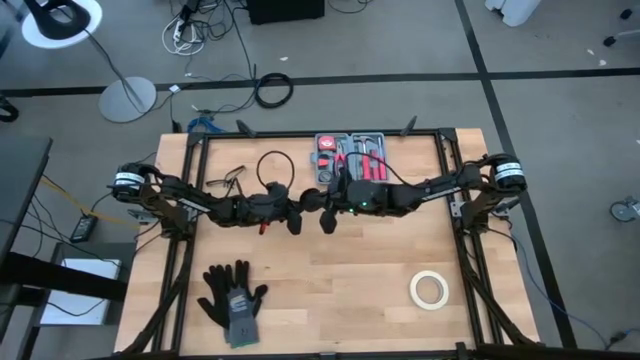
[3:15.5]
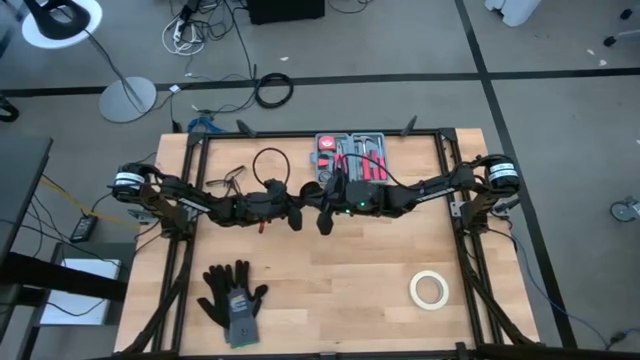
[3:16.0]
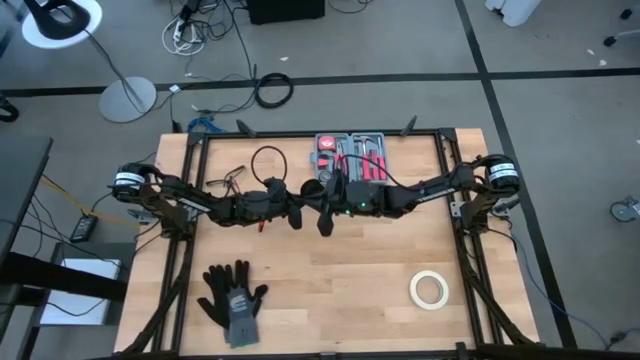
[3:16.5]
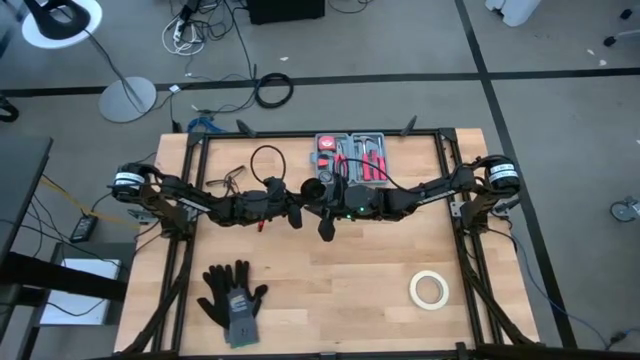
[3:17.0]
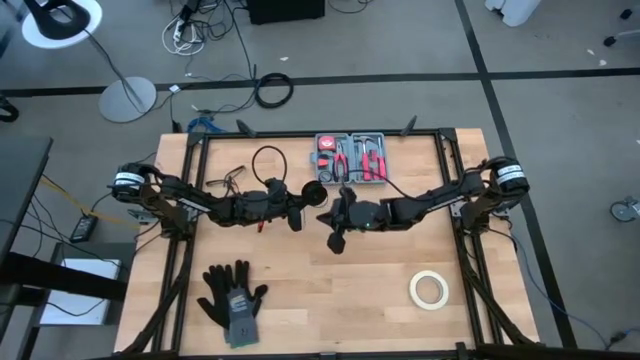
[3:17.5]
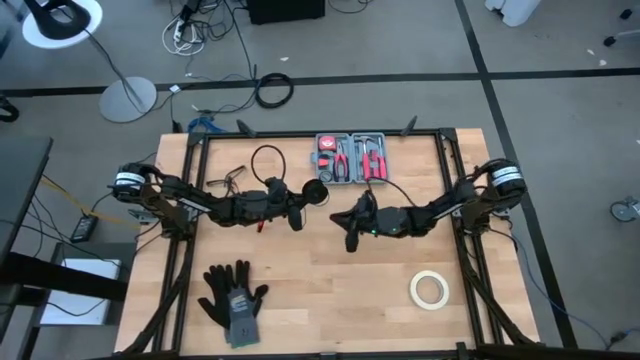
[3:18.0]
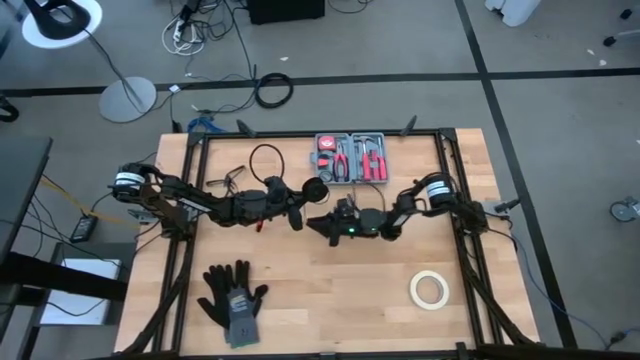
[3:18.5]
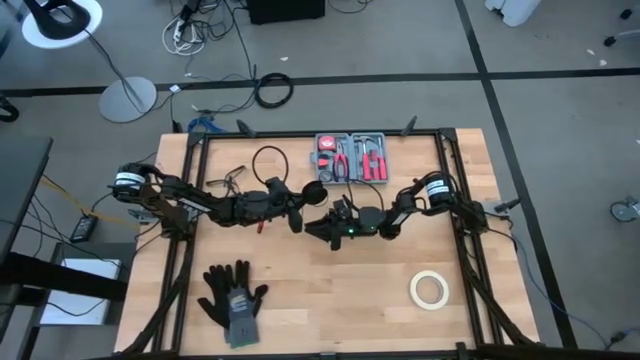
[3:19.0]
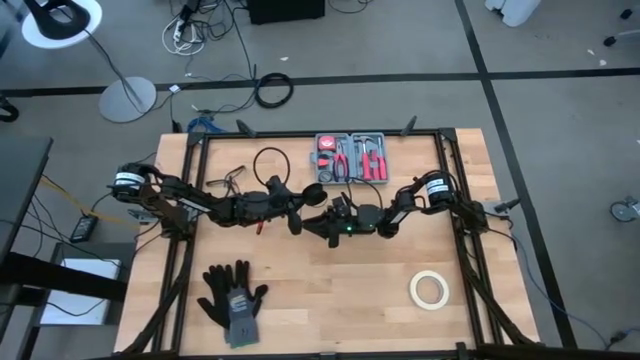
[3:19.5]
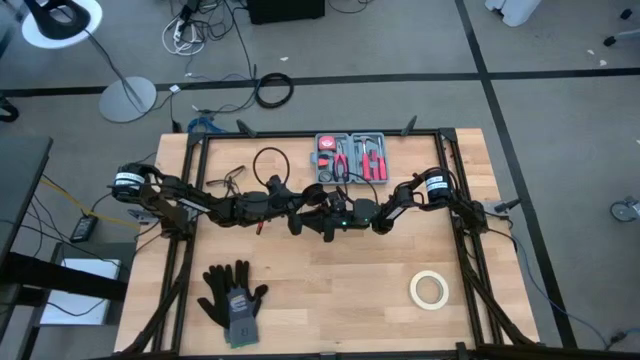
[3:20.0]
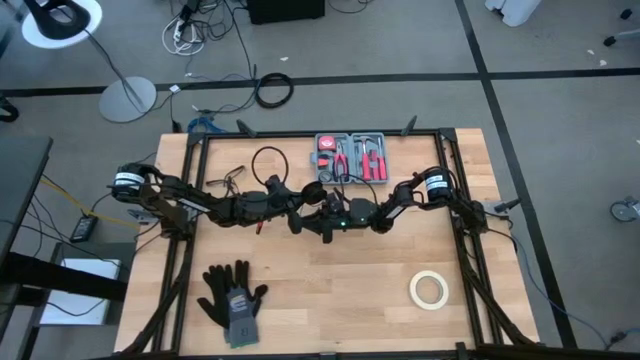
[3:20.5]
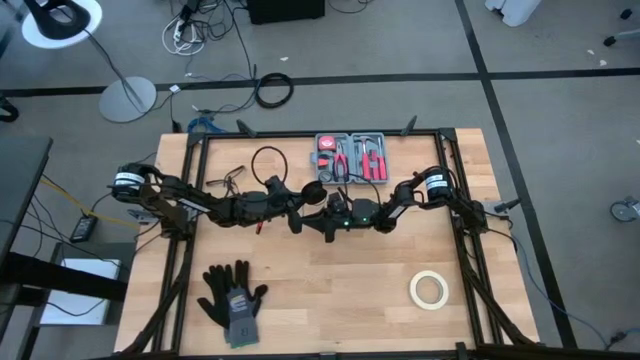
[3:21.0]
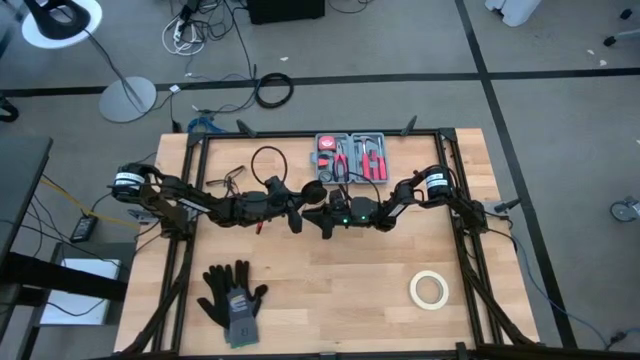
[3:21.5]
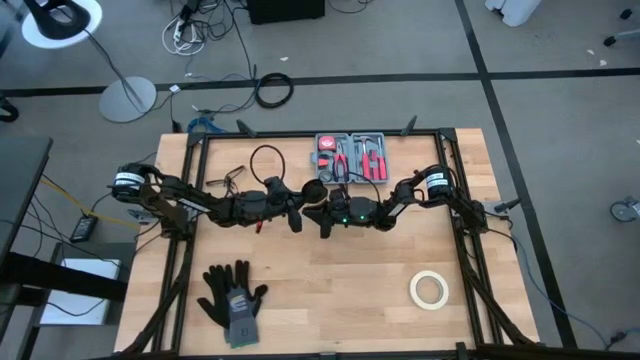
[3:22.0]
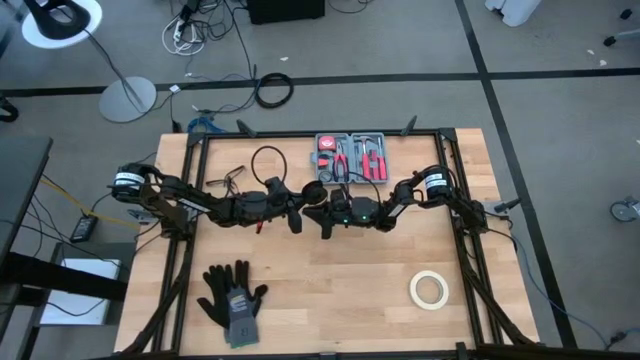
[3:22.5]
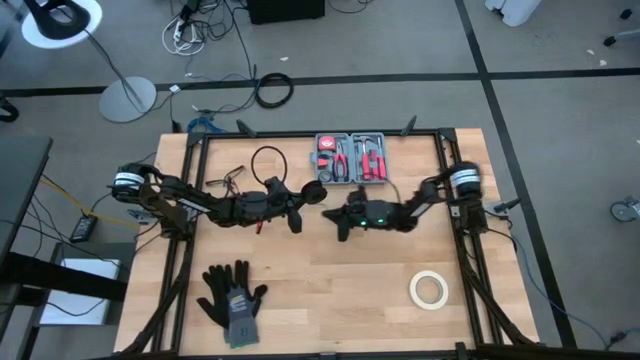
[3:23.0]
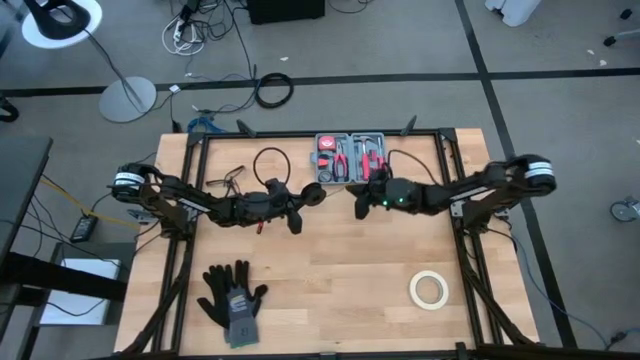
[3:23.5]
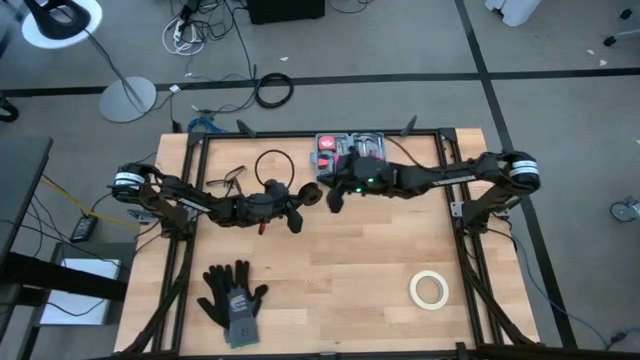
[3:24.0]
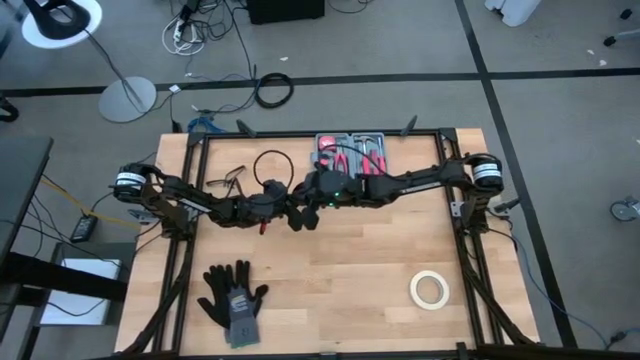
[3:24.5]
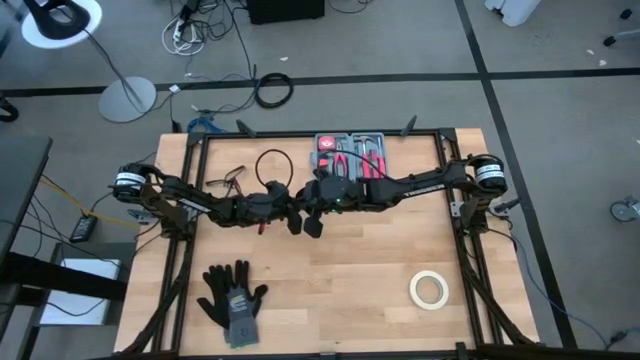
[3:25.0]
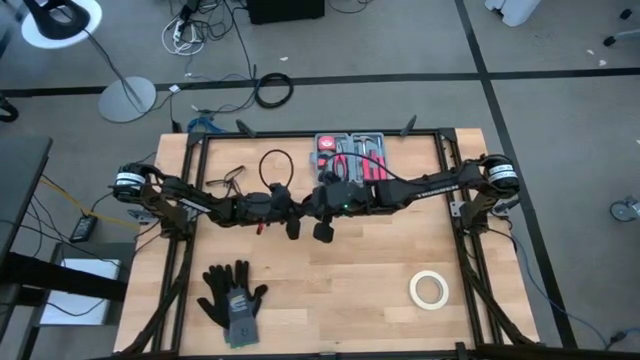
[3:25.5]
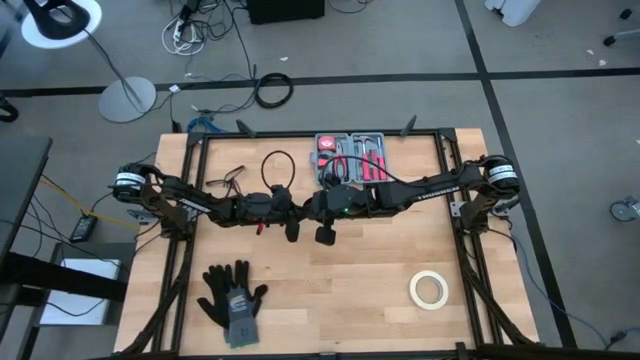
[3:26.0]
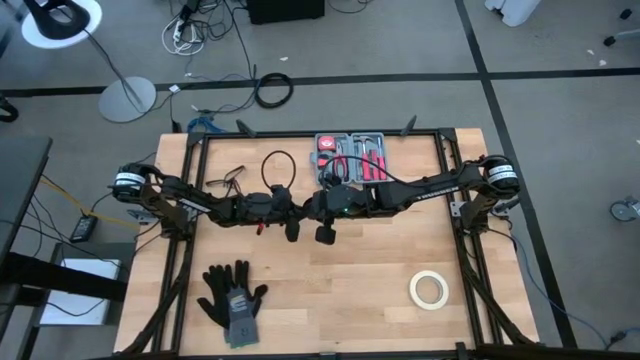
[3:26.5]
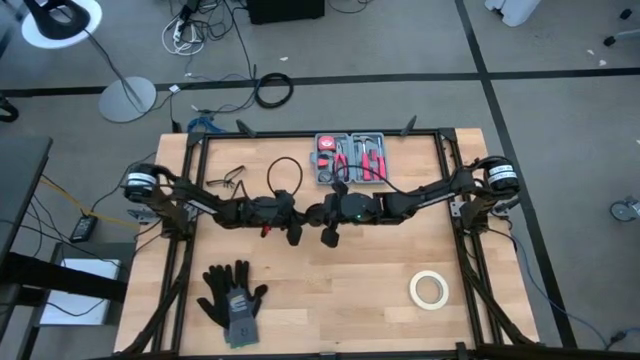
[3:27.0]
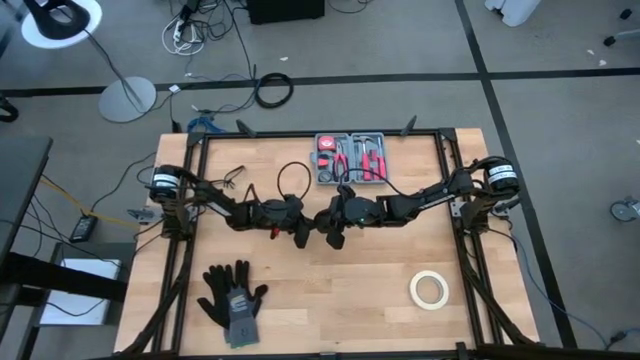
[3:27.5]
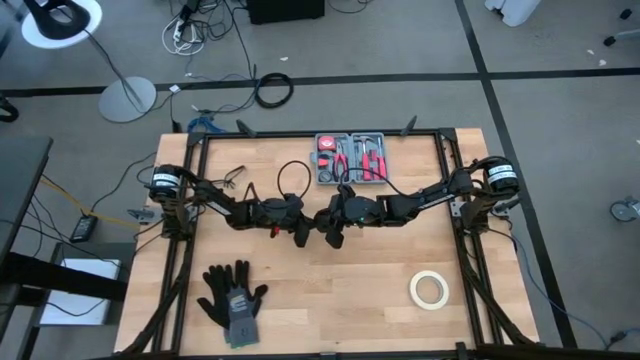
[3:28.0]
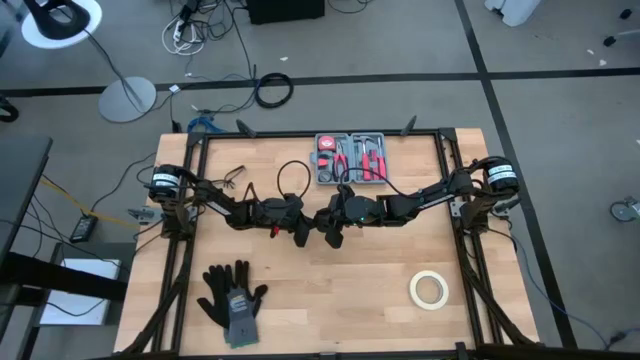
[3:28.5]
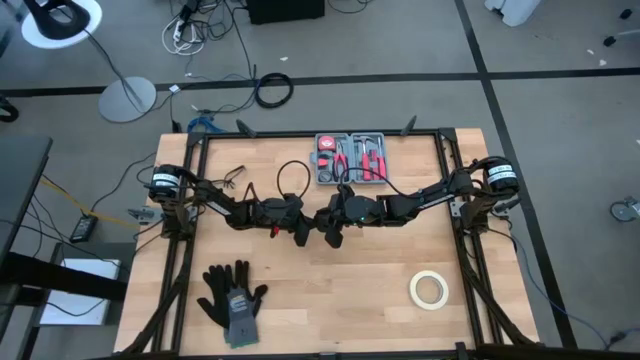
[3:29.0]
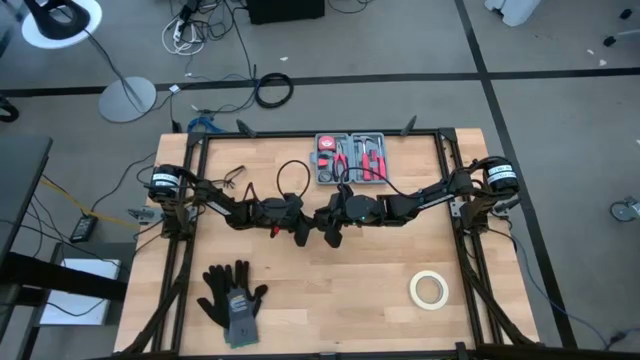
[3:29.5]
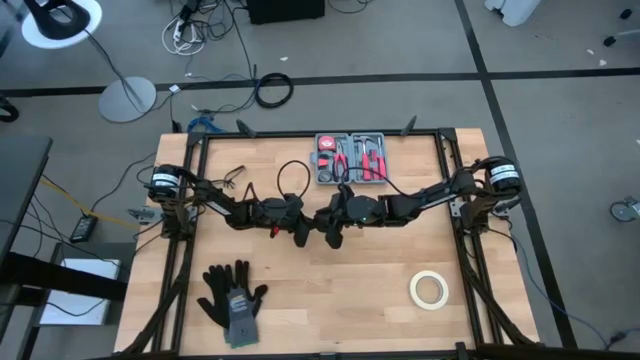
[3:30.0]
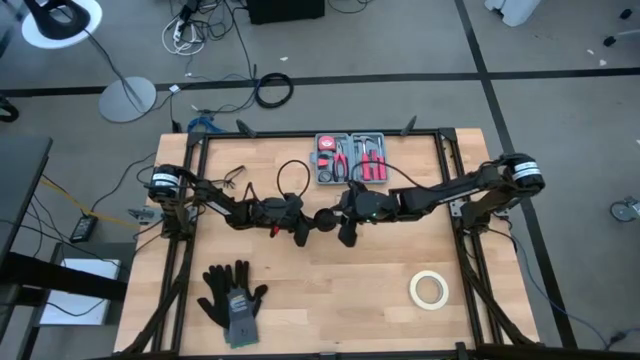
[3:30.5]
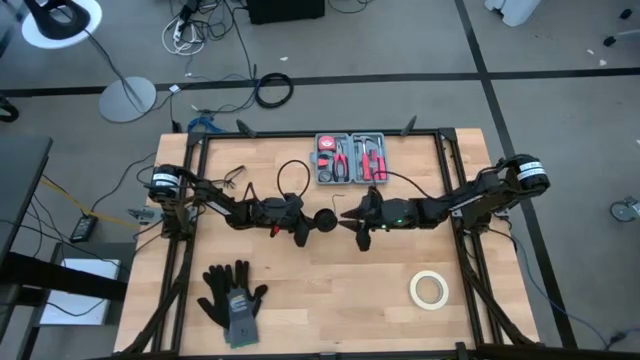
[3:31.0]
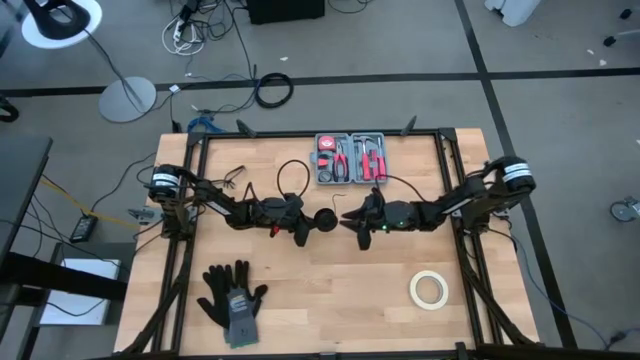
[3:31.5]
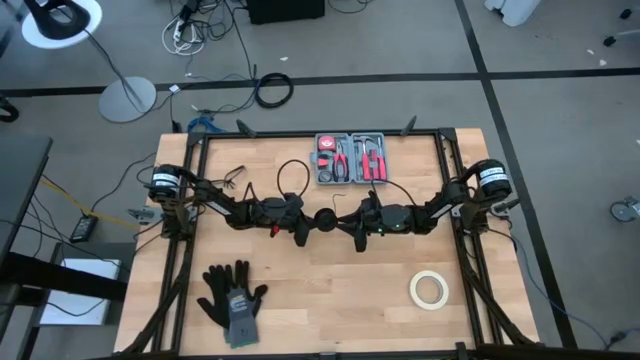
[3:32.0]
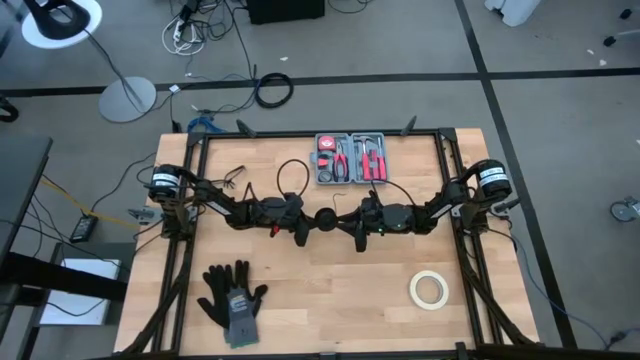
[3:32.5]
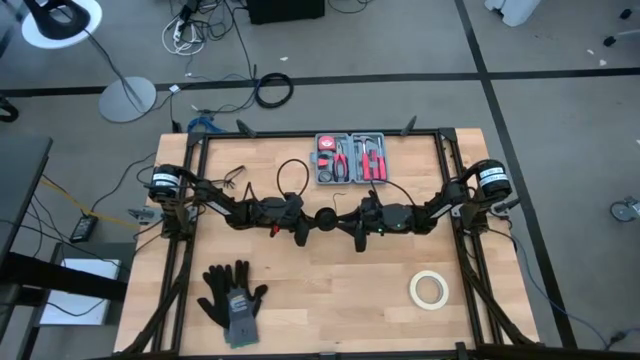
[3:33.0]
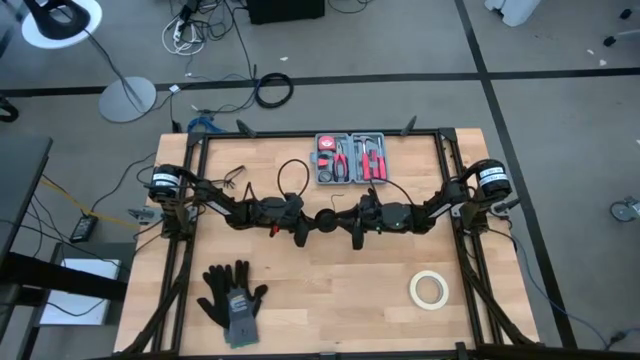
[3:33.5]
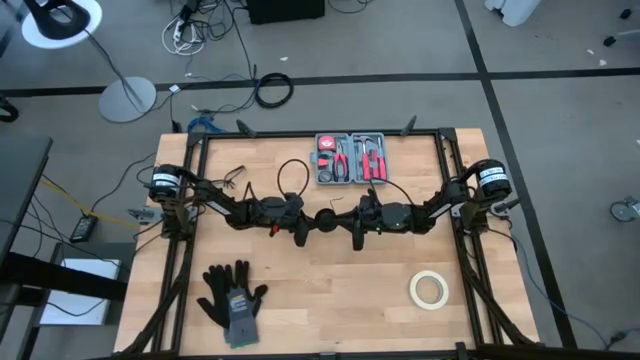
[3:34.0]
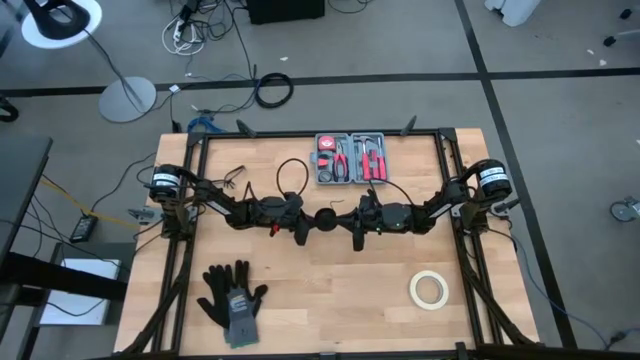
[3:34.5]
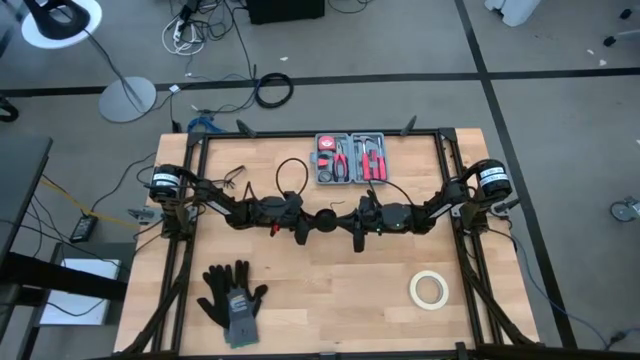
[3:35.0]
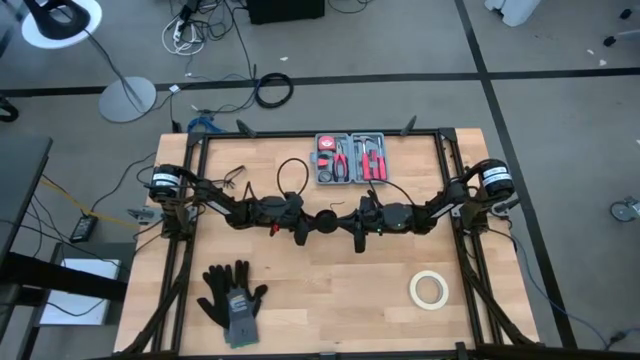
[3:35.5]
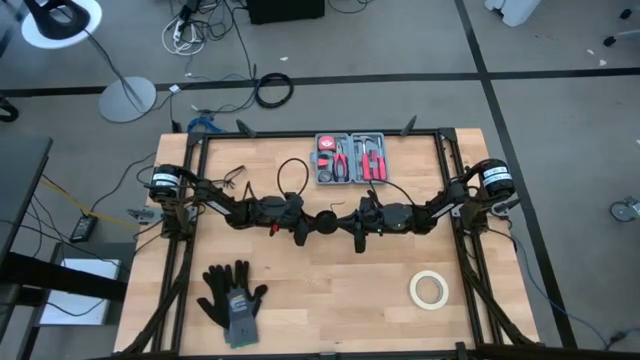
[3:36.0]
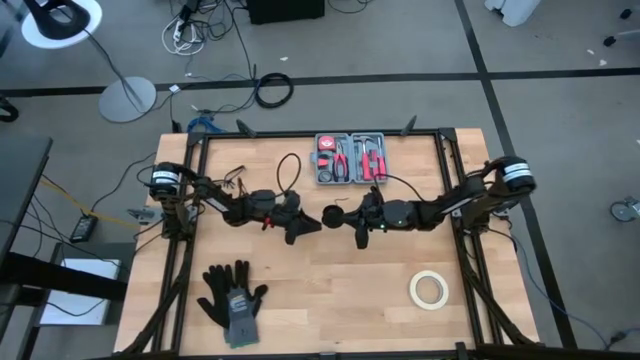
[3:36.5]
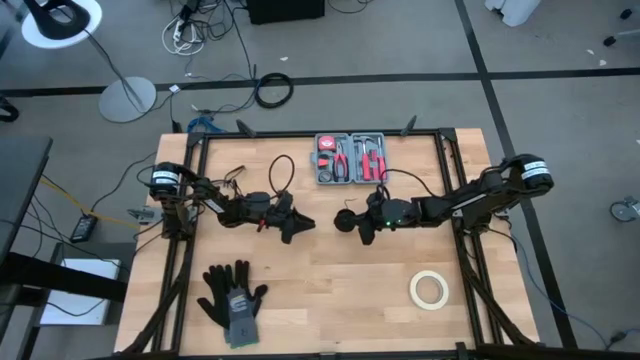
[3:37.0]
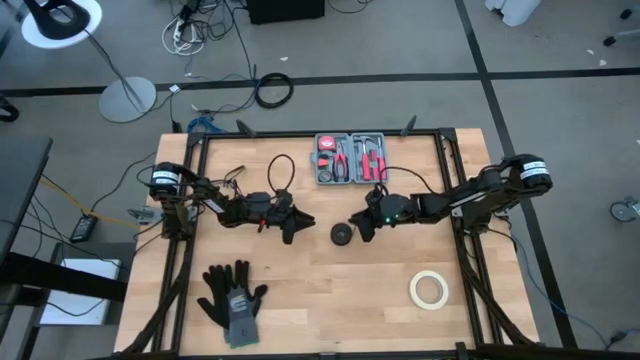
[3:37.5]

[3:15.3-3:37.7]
Task: Coil cords
Coil the black wire onto the black spool
